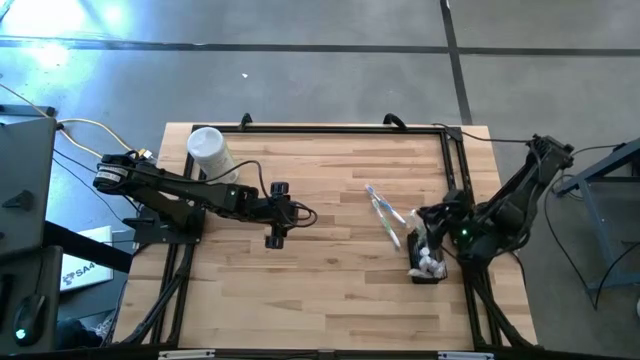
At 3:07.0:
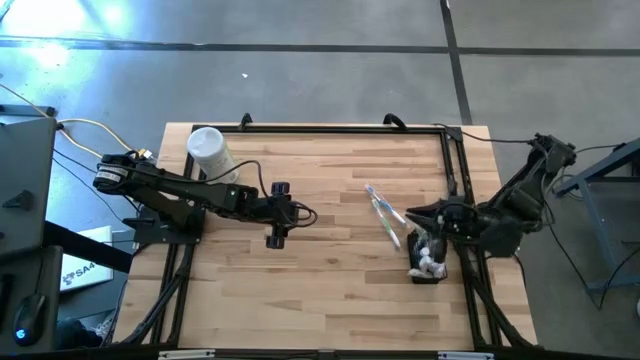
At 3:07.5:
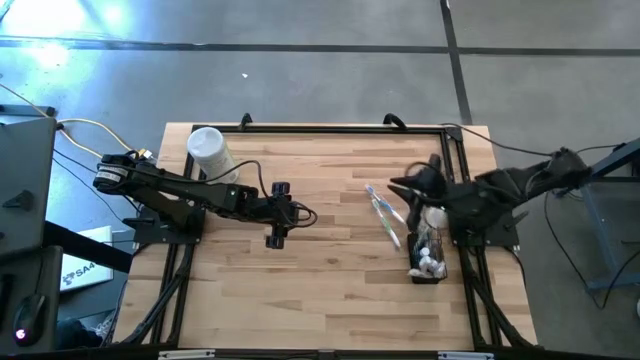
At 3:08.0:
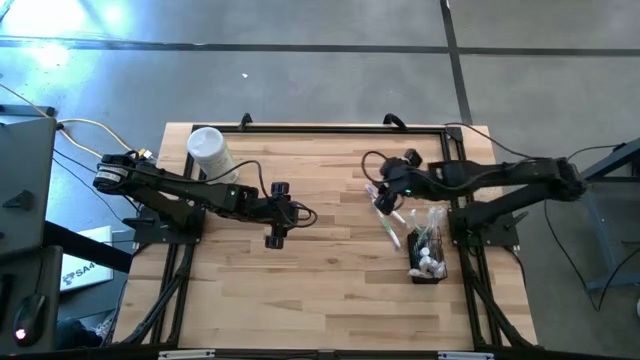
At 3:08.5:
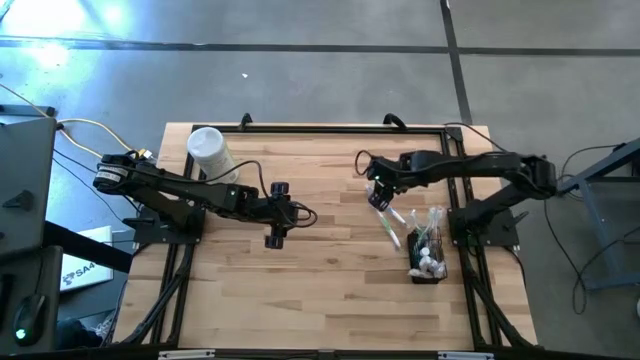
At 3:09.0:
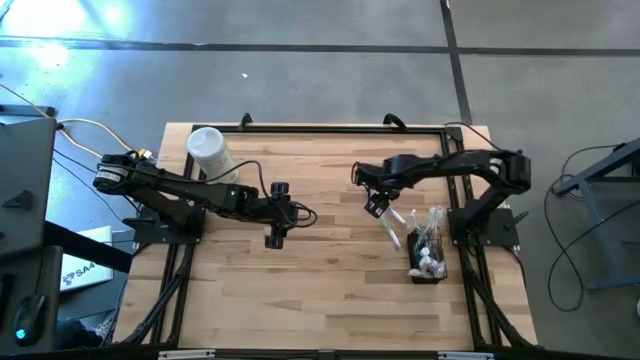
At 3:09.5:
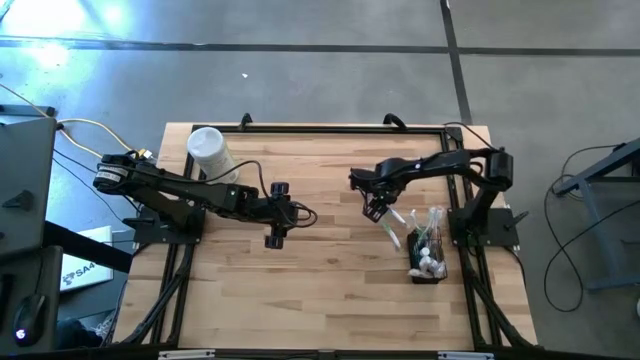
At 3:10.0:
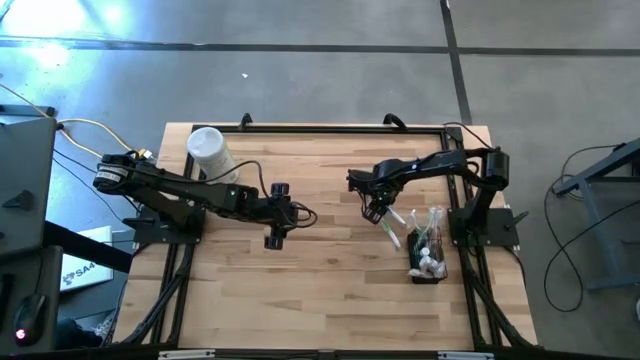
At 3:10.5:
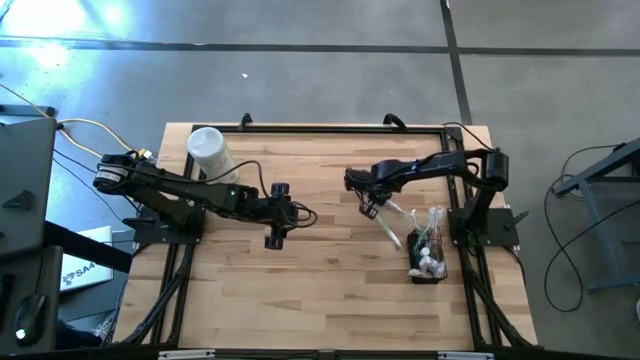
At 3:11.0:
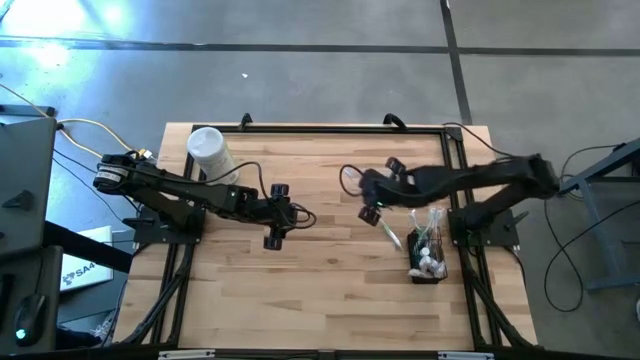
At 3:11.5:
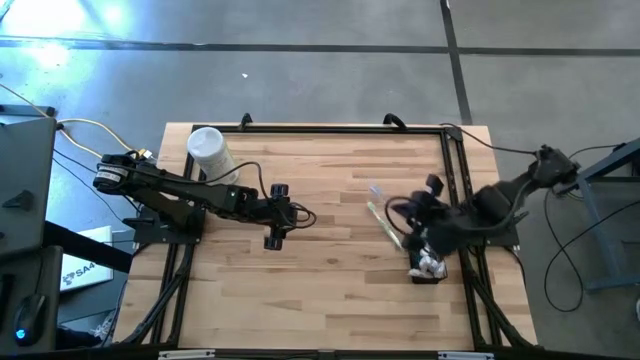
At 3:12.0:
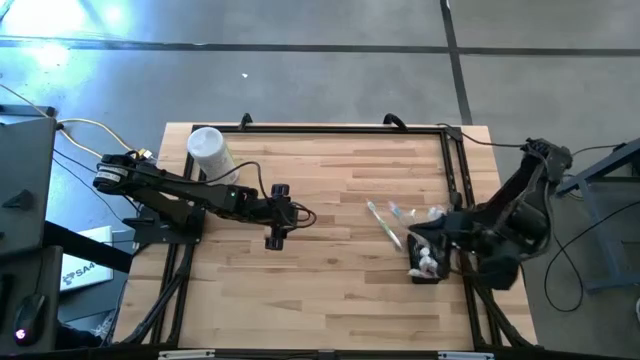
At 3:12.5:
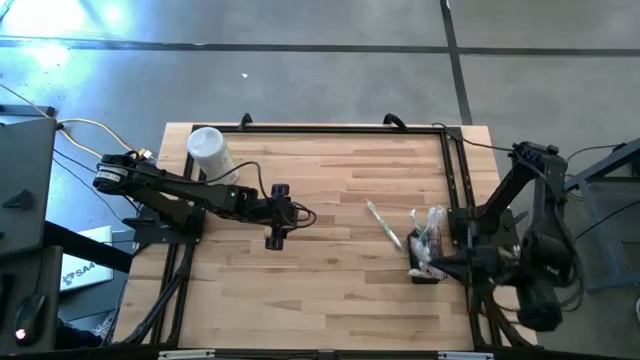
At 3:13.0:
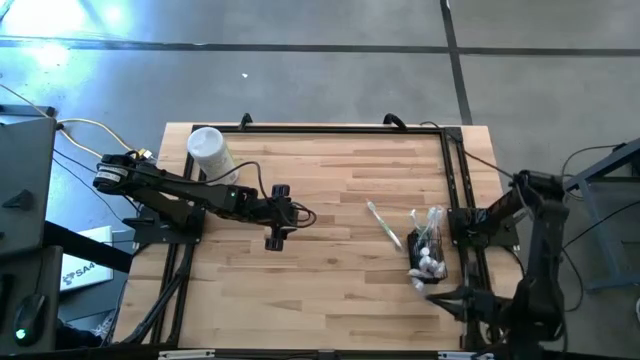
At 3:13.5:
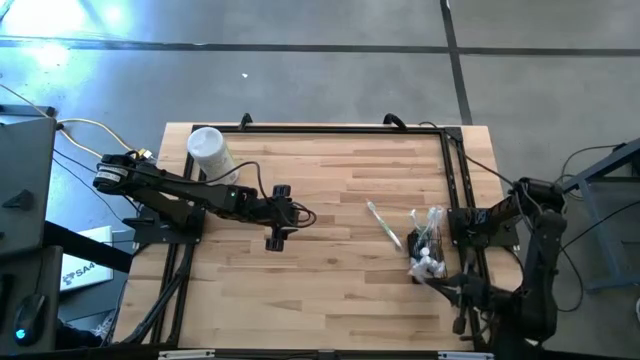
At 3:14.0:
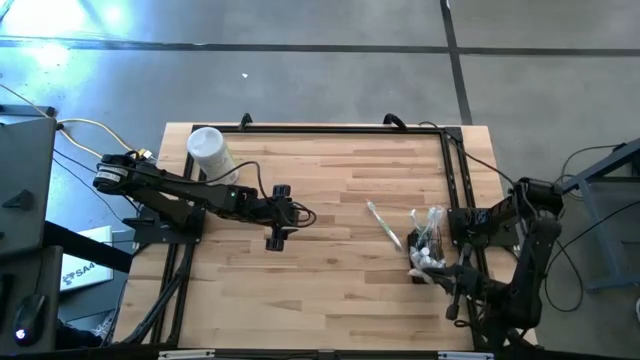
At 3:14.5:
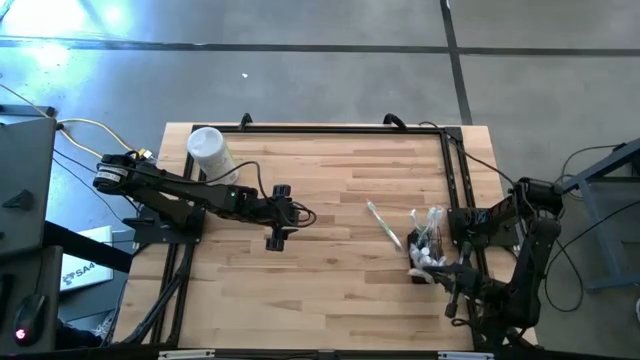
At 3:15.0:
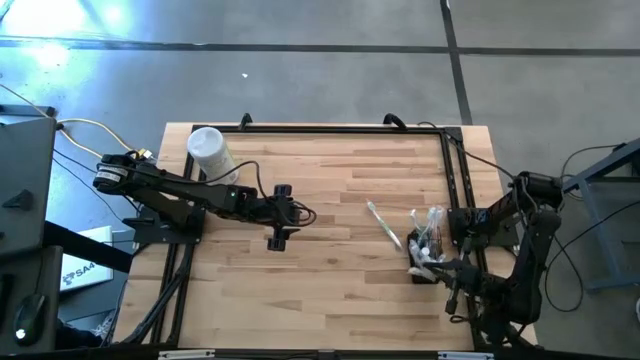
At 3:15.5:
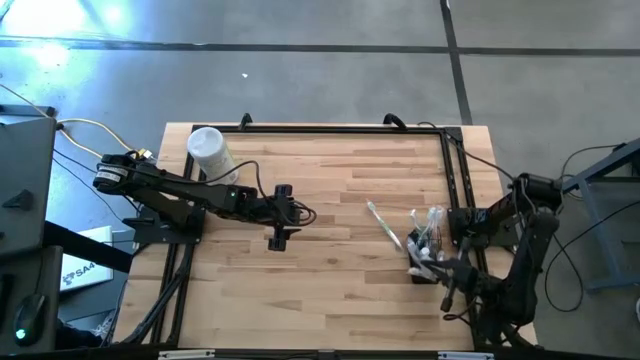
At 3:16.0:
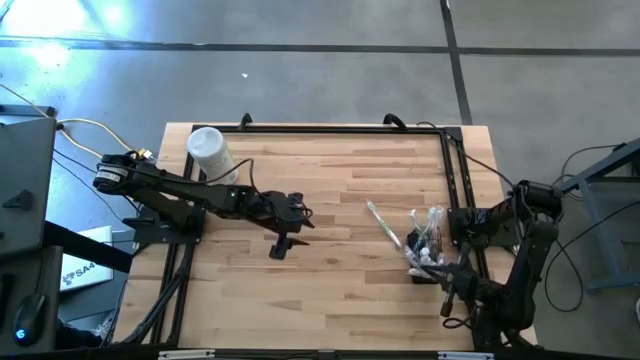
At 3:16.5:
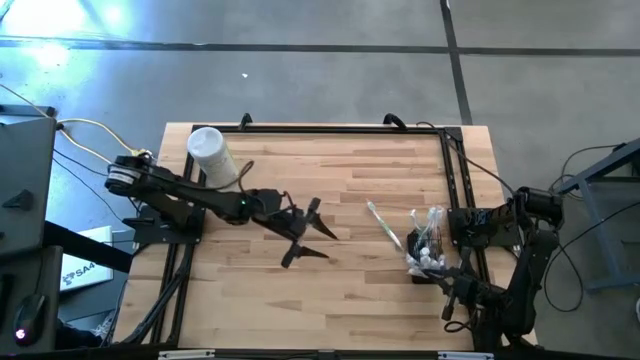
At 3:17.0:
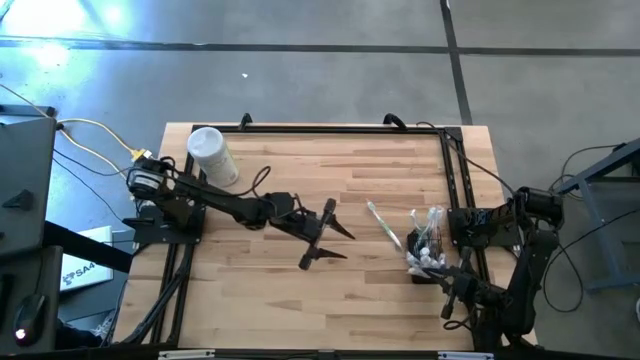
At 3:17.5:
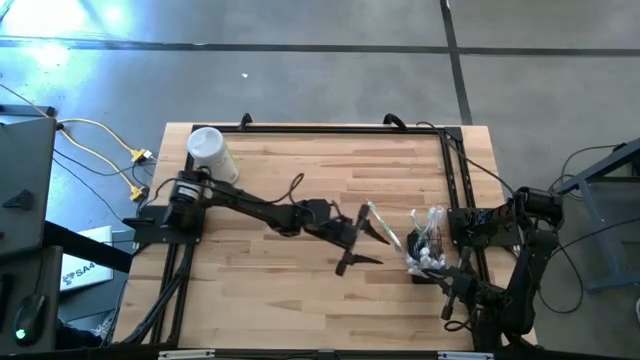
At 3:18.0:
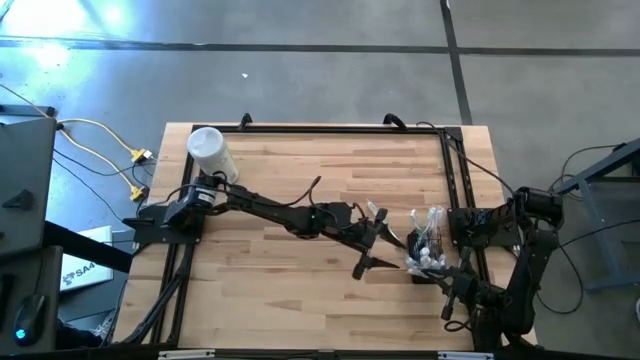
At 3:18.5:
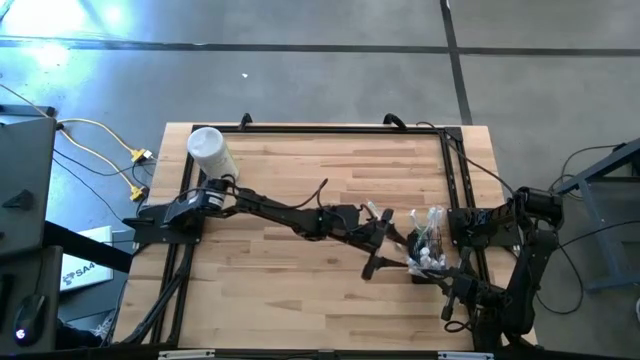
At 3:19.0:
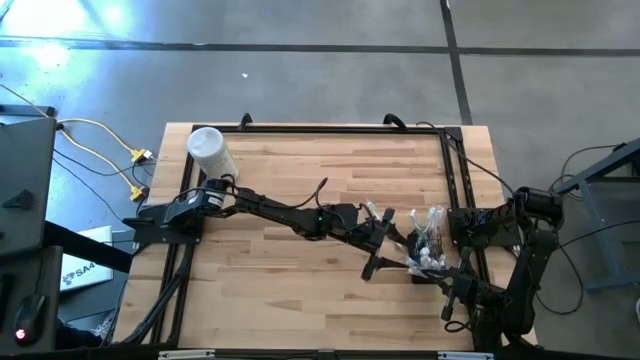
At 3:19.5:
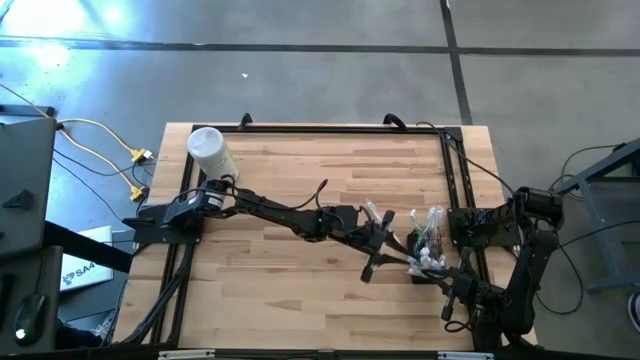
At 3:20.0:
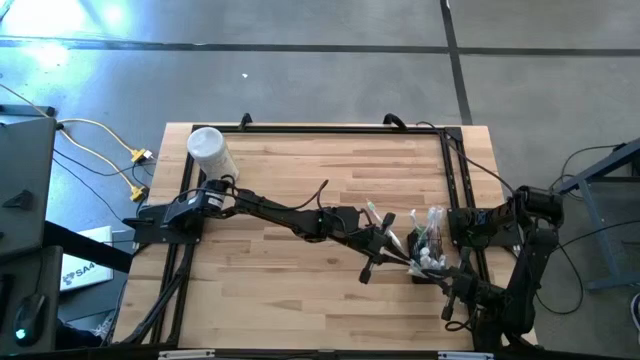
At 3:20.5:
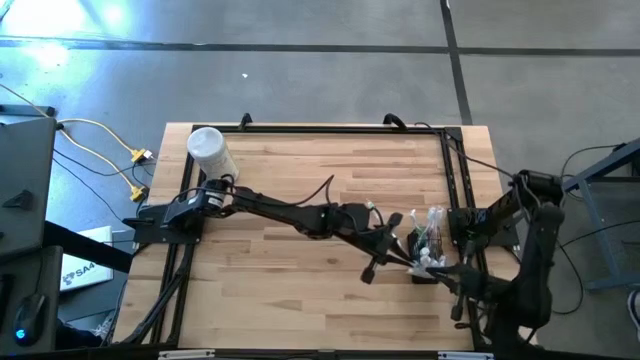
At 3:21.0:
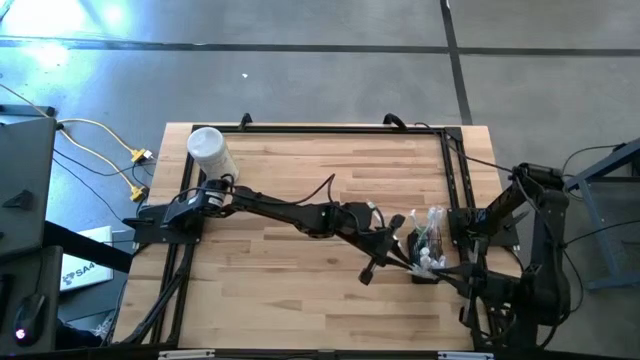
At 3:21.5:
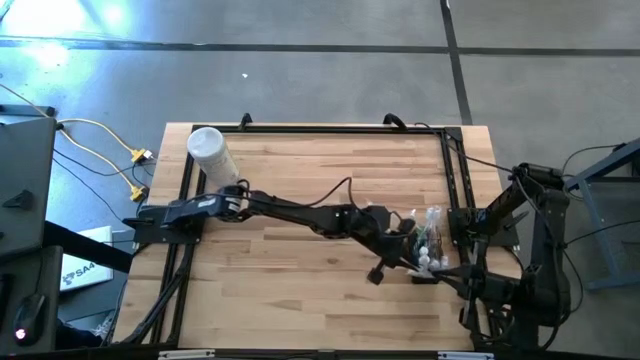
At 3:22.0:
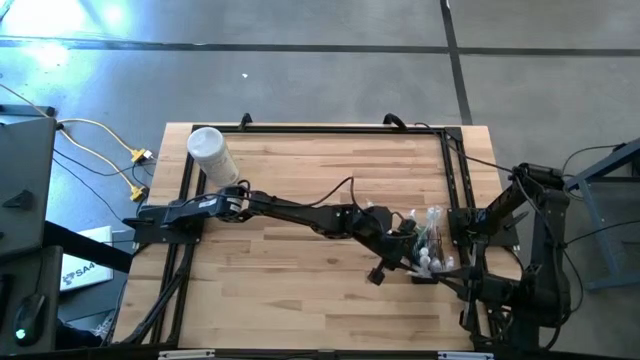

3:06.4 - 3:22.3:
Task: Pick & Place toothbrushing station
Put the blue toothbrush into the black mesh organizer

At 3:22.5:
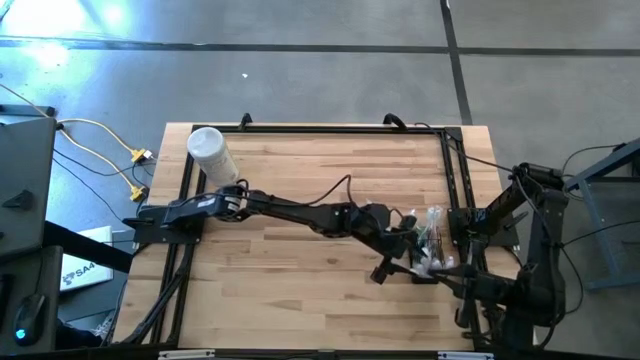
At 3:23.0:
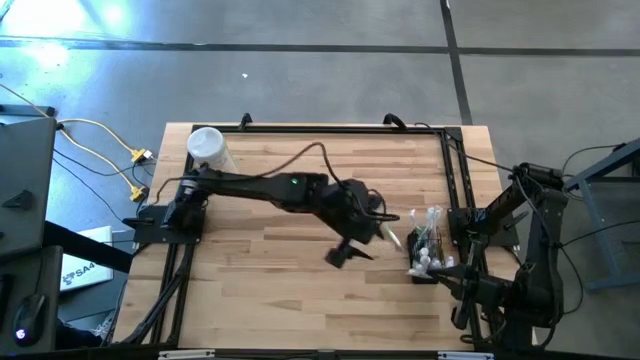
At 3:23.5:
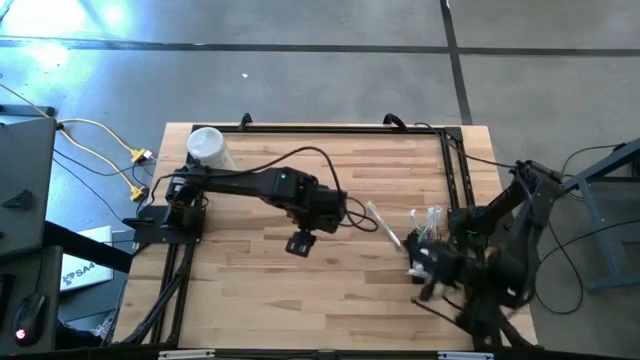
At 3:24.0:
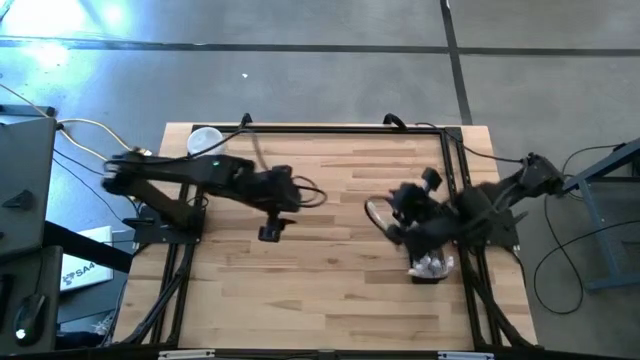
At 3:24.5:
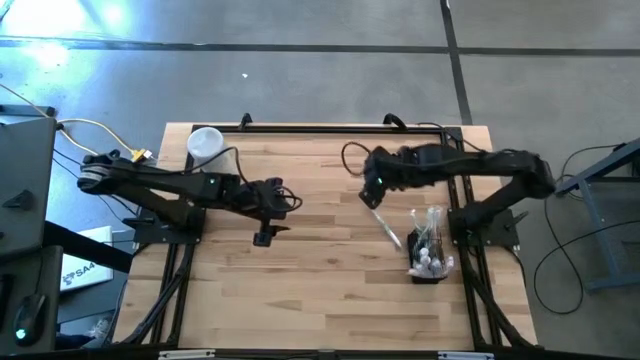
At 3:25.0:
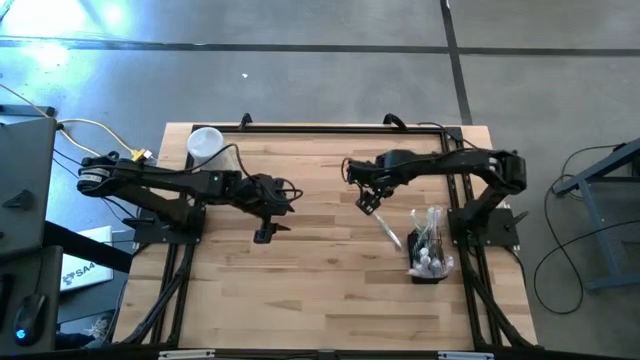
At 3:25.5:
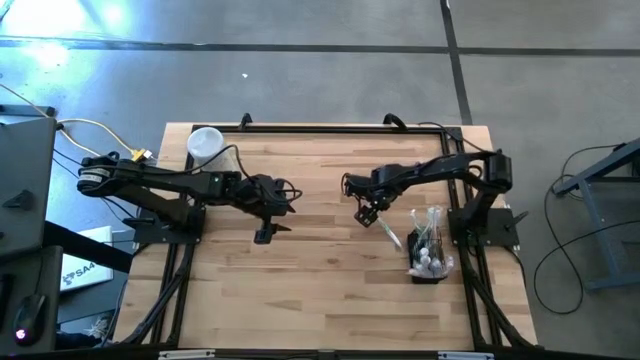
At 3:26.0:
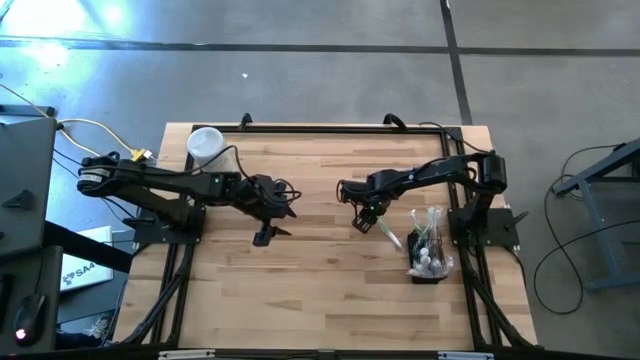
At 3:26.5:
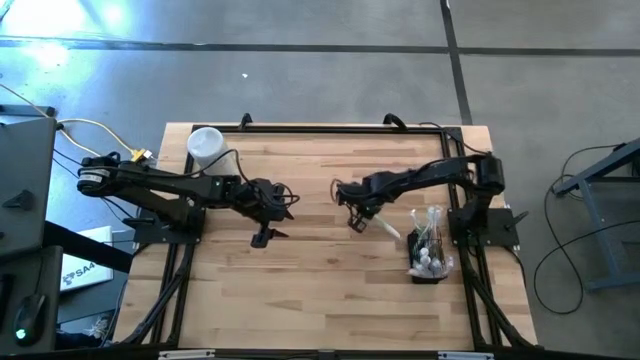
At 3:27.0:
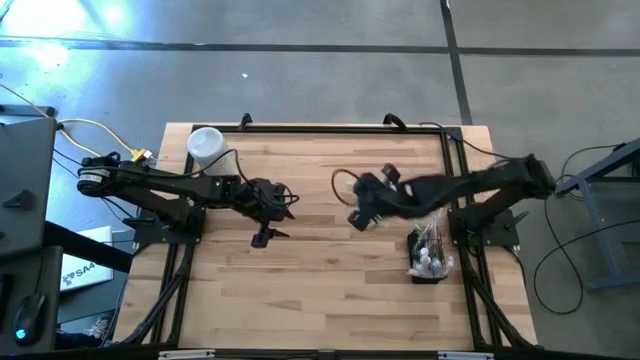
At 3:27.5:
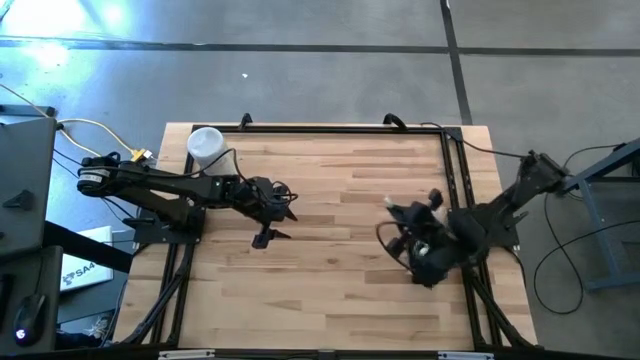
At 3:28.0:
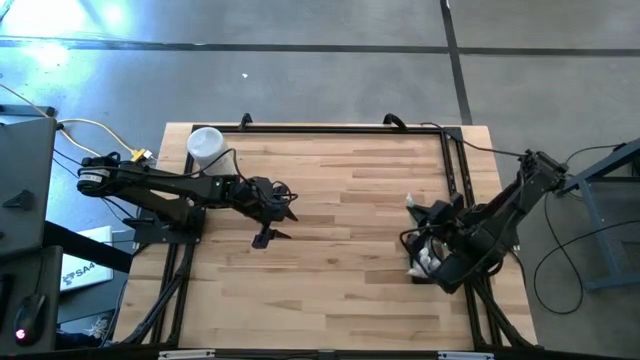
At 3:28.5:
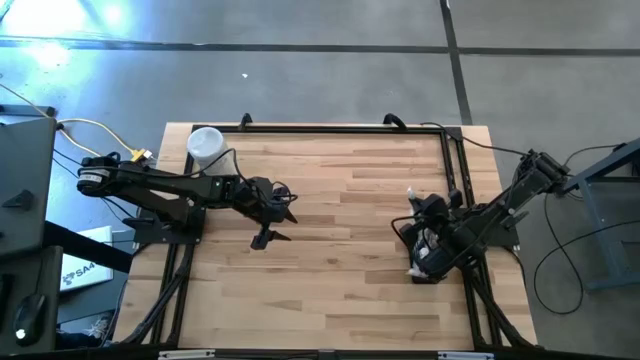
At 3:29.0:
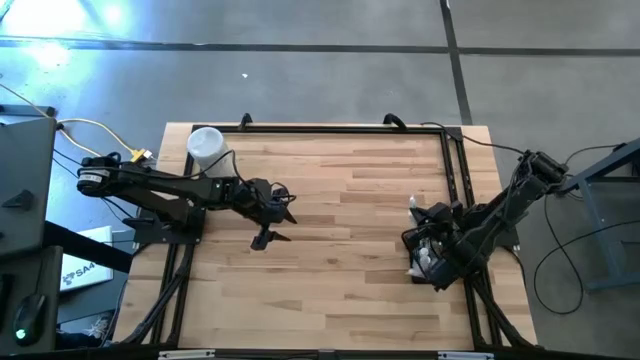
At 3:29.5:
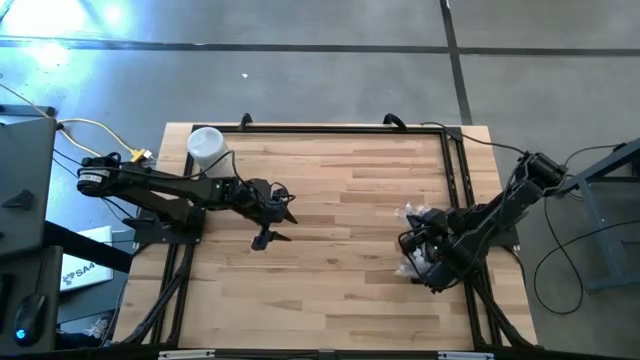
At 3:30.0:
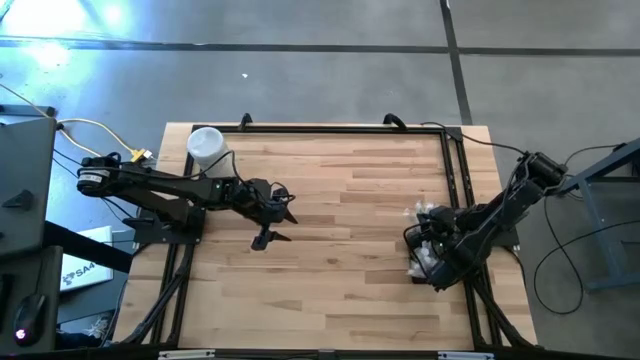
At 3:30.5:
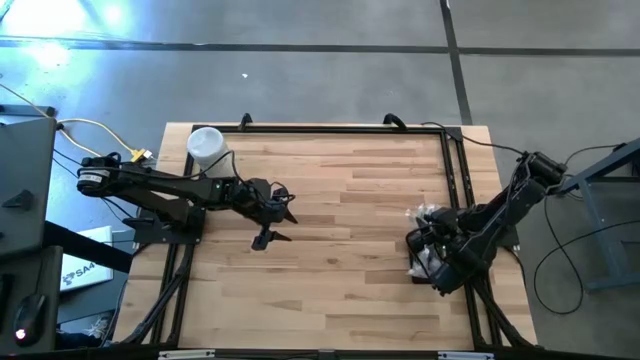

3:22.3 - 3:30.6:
Put the green toothbrush into the black mesh organizer
